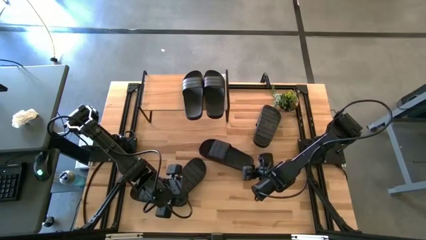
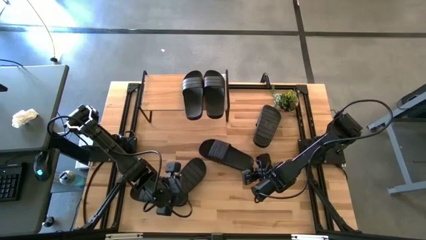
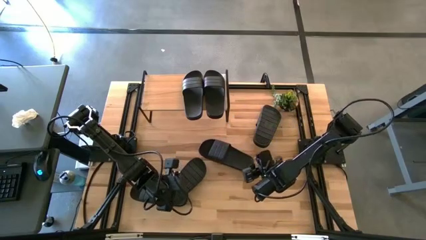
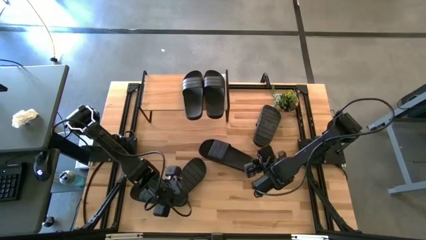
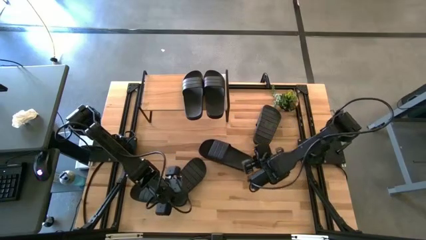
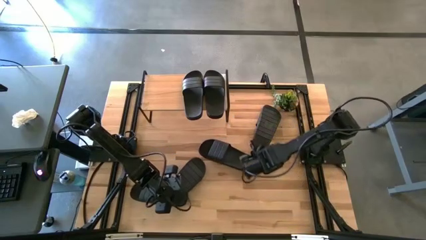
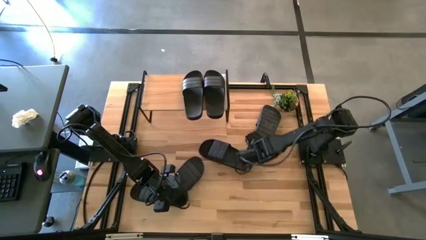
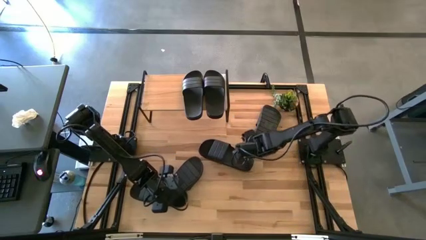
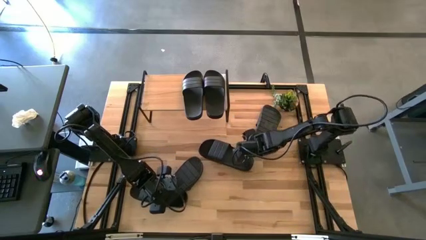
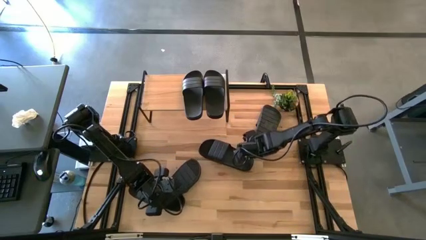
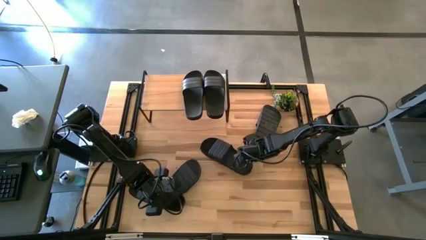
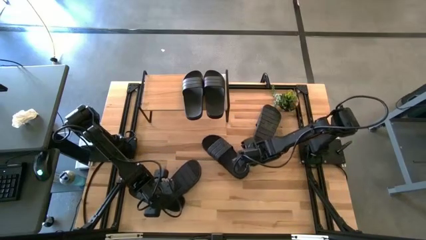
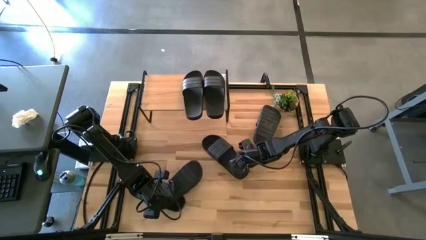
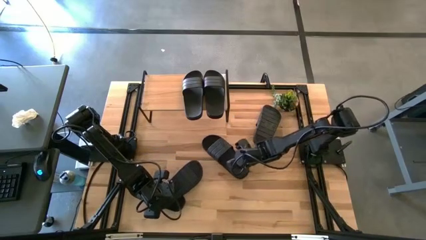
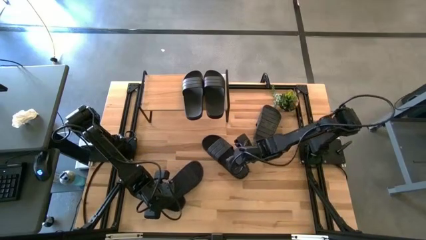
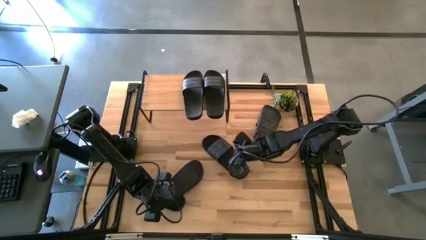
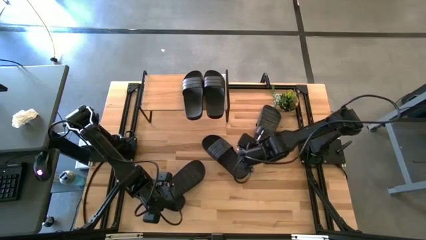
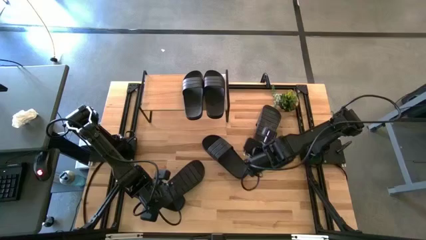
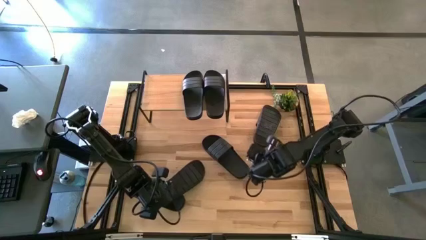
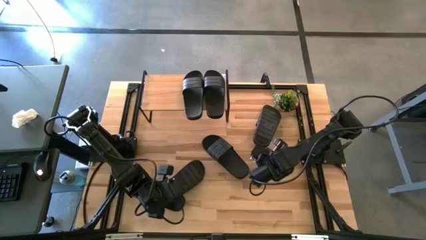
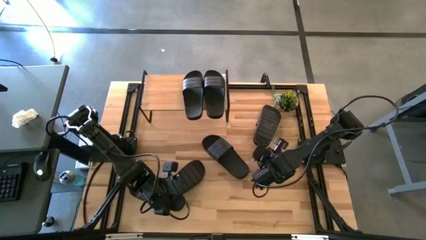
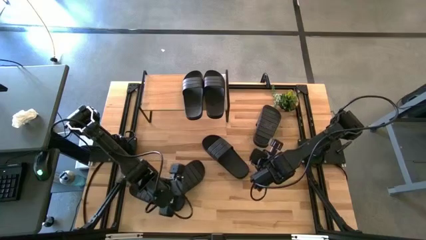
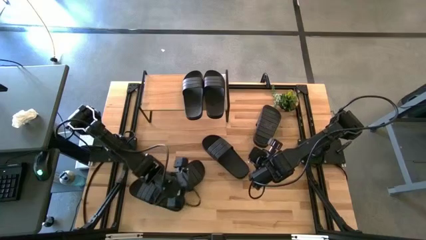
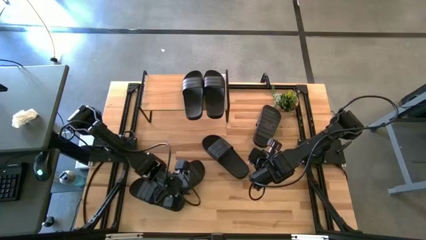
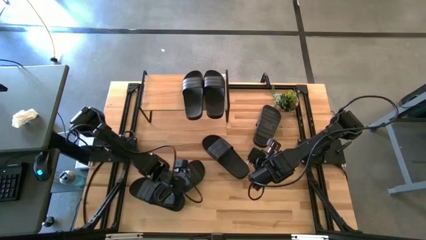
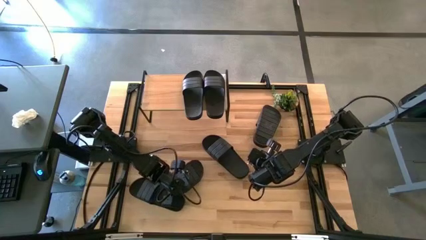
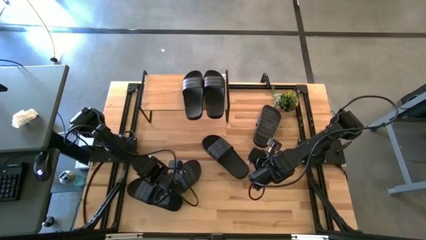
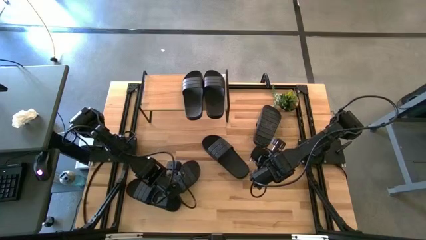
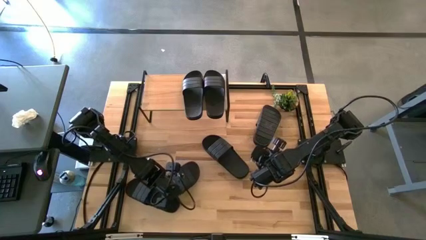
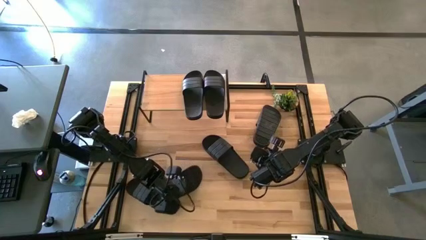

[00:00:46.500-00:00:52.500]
Task: Pick and place slides into the shelf
Adjust the black slippers on the table

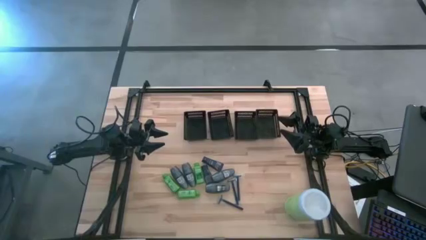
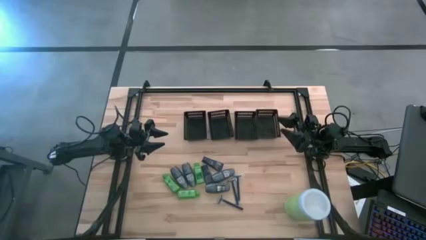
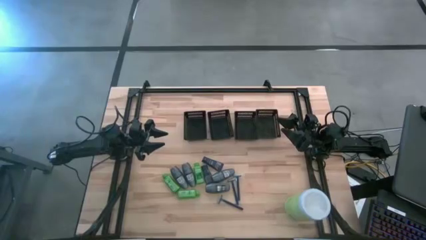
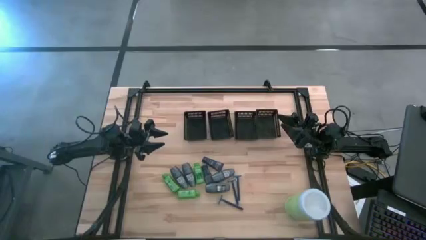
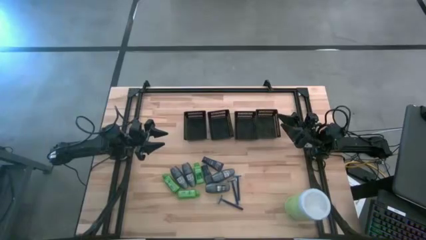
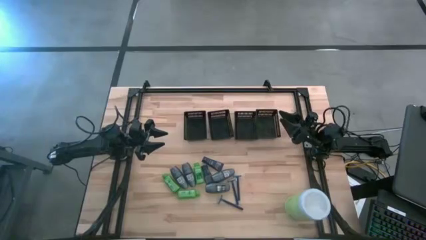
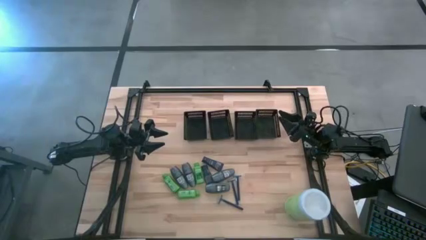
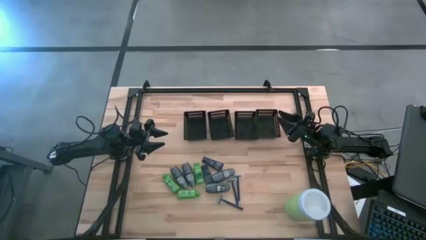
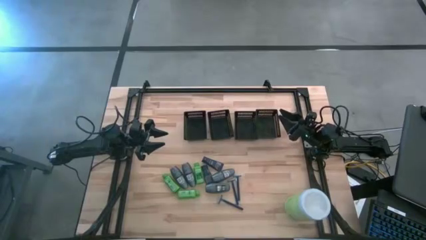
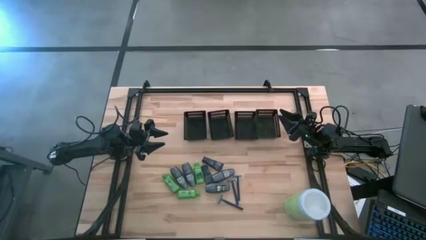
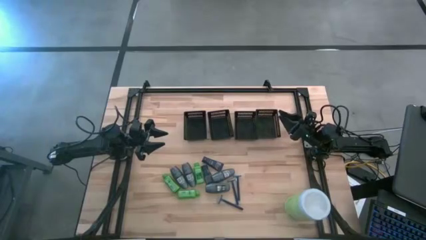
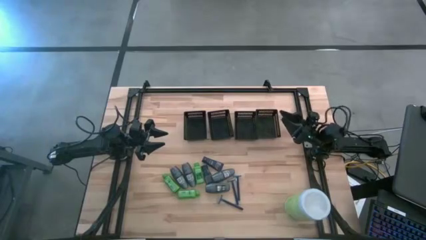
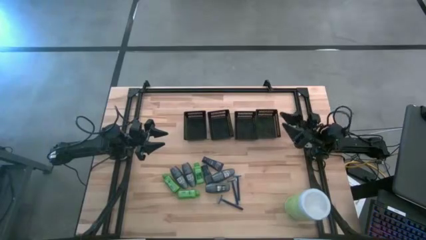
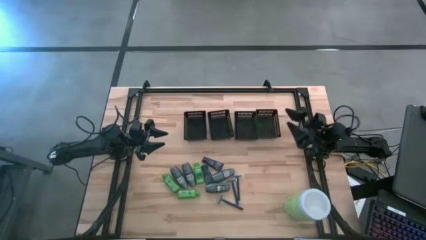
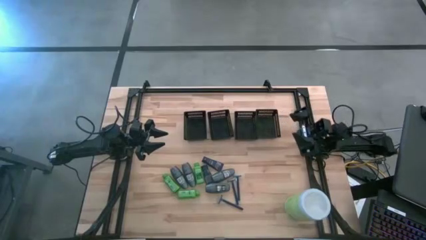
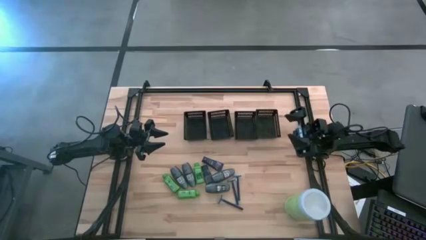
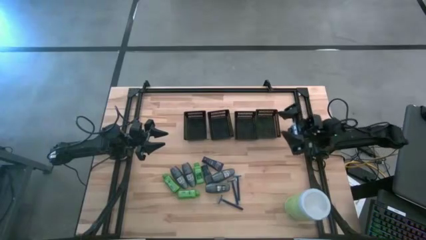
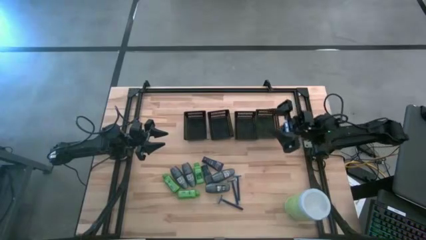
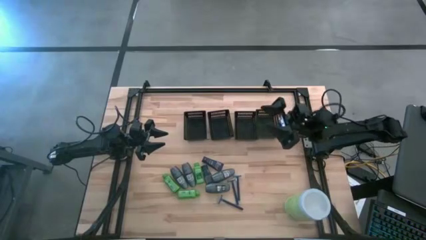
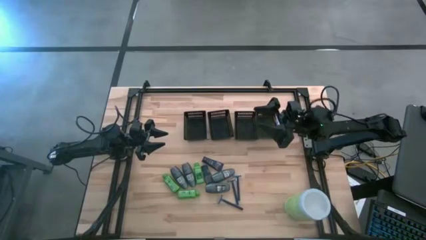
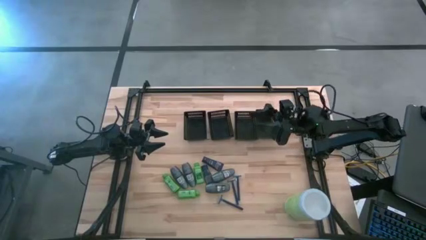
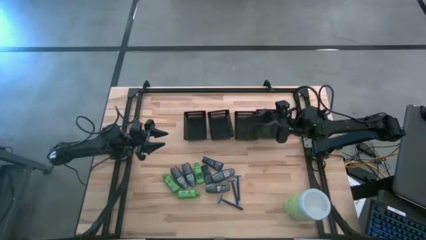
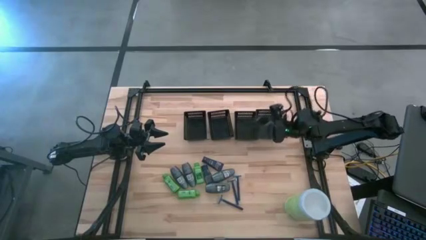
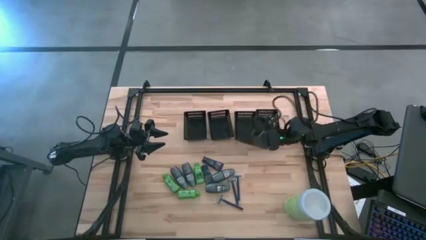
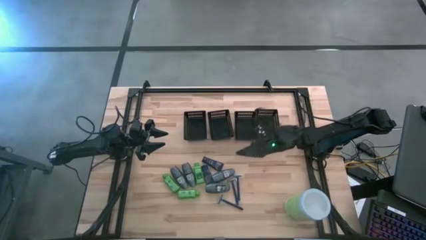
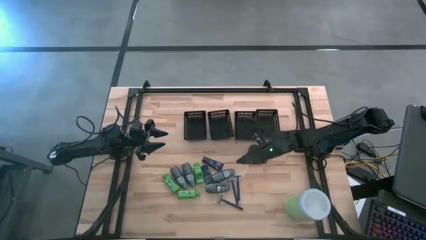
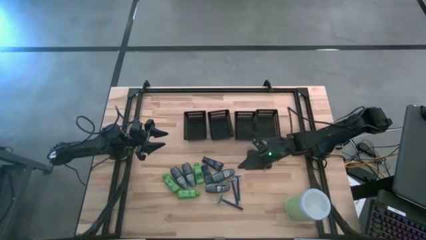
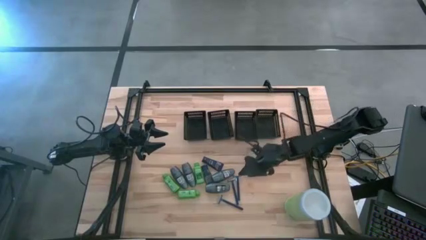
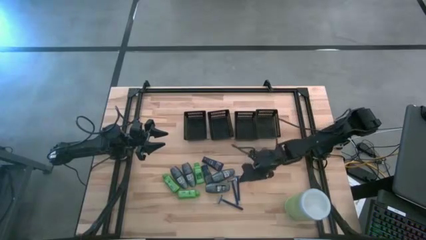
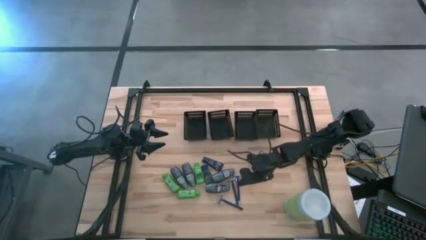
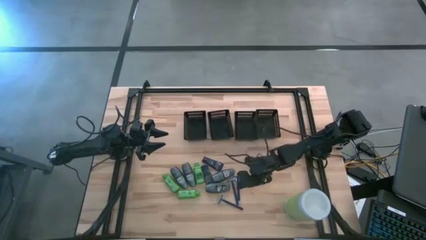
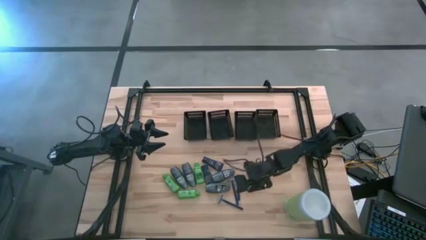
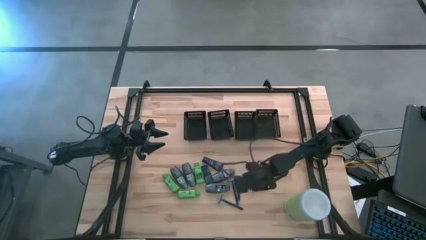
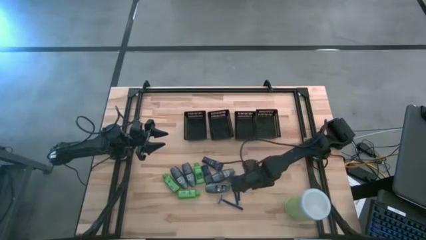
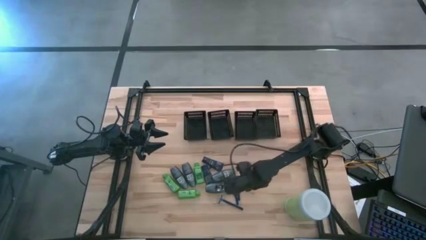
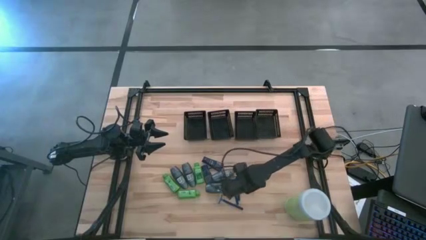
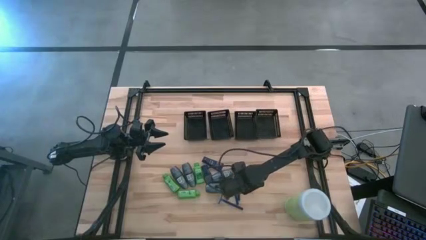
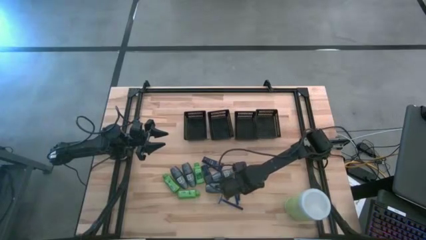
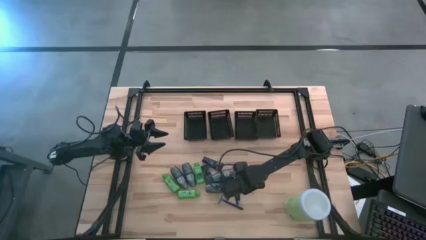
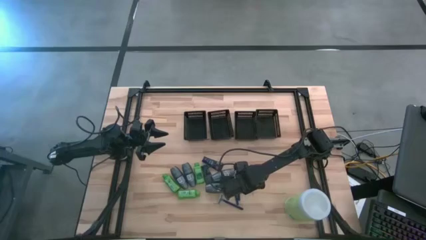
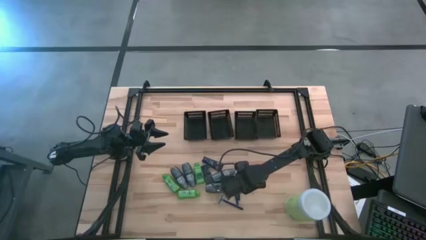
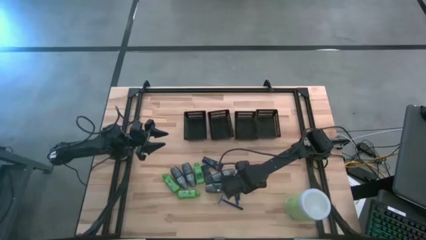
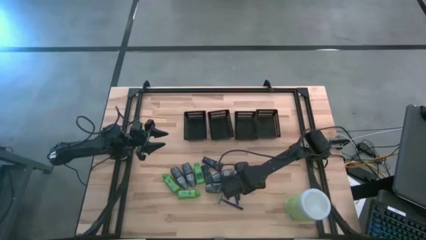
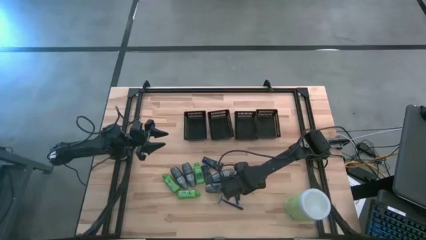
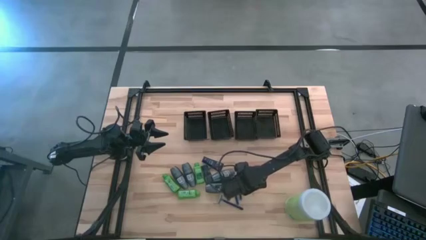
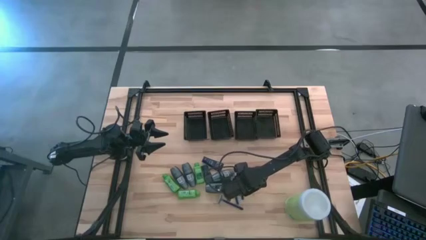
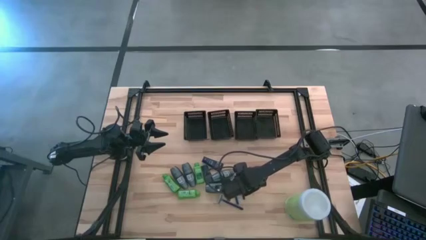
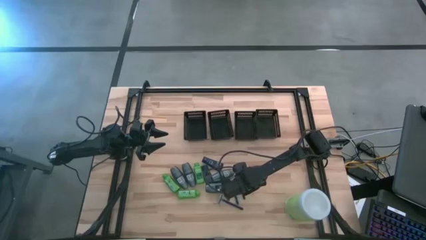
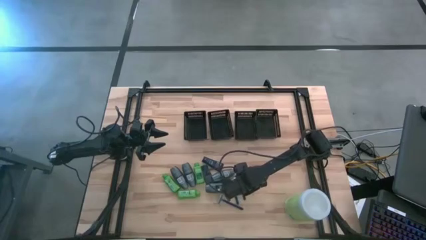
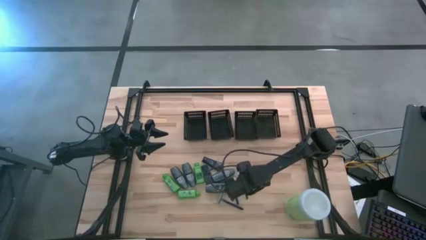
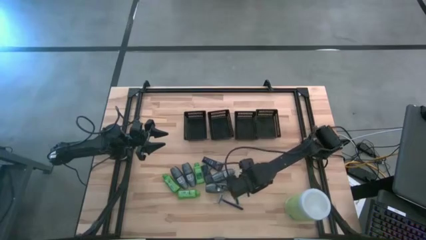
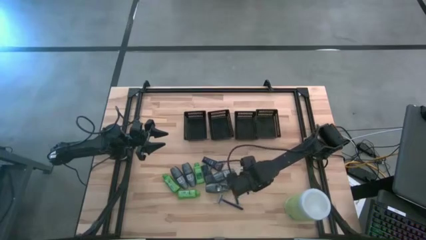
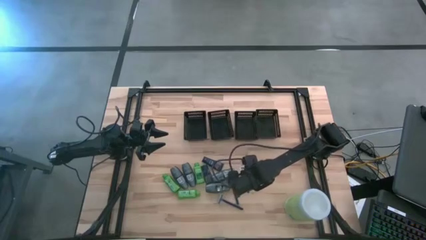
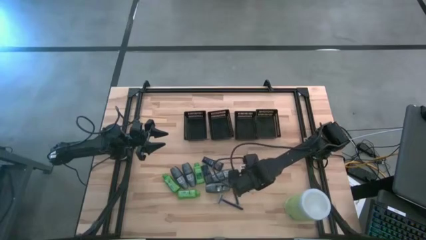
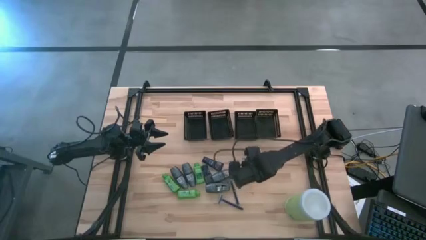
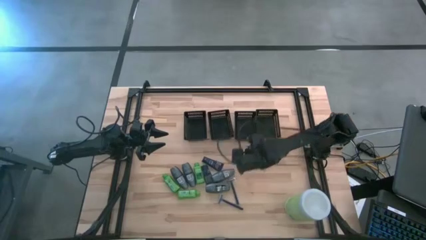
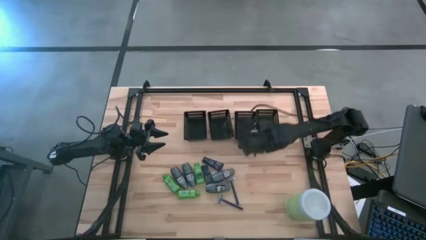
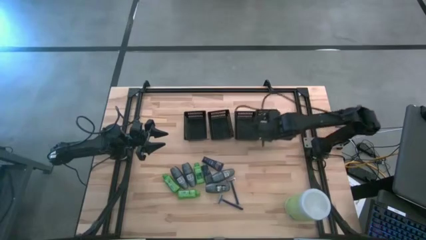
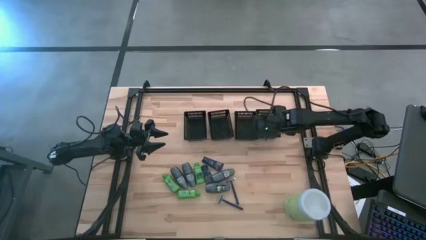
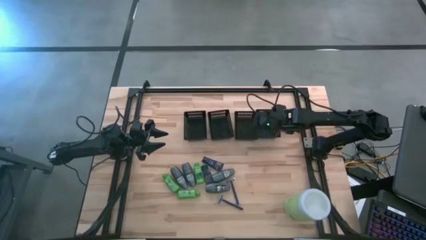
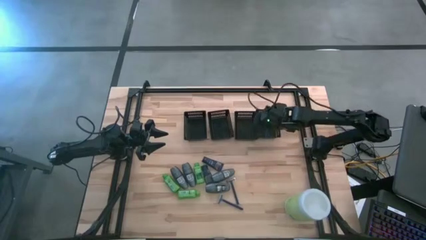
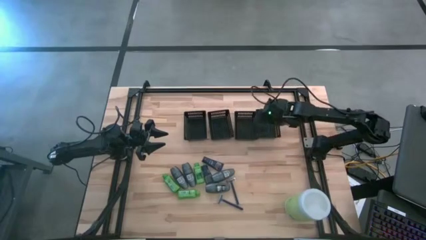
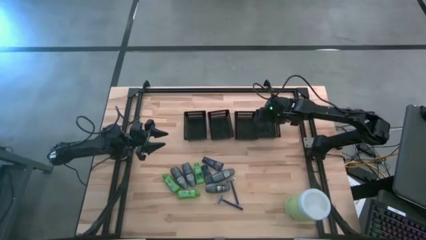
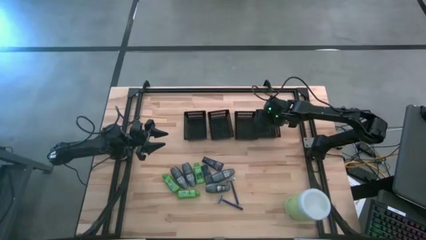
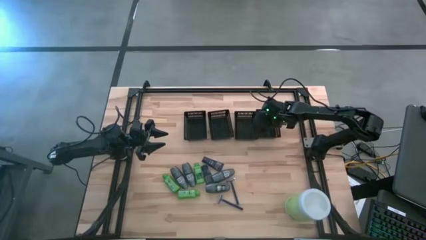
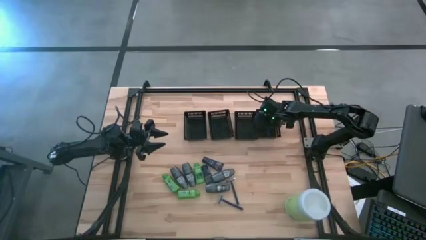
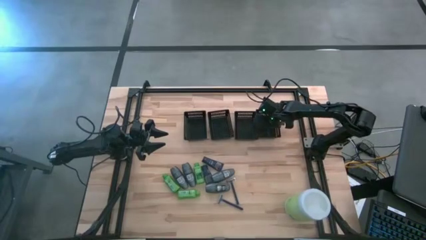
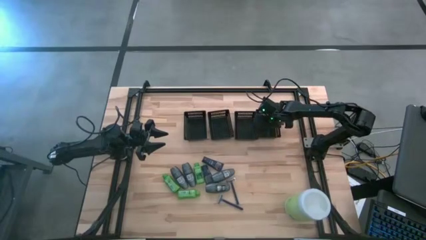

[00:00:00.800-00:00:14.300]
Task: Pick & Place Travel size toiletries
Put the razor into the right black basket
